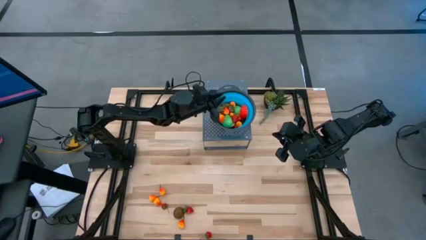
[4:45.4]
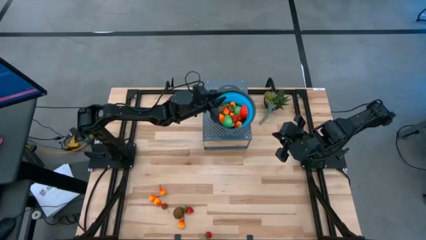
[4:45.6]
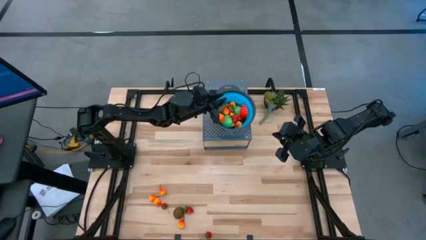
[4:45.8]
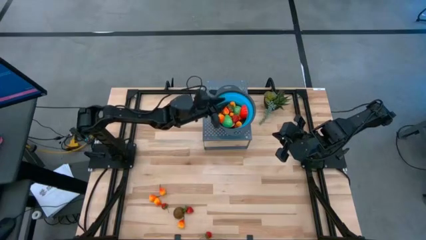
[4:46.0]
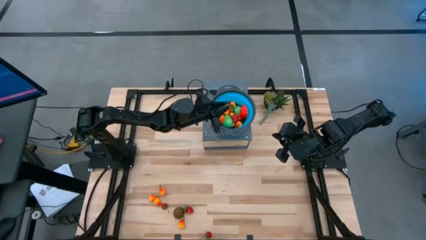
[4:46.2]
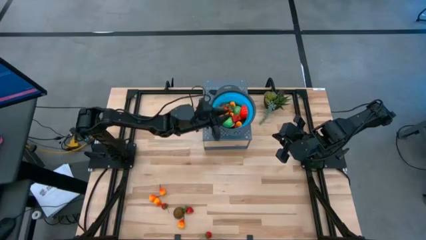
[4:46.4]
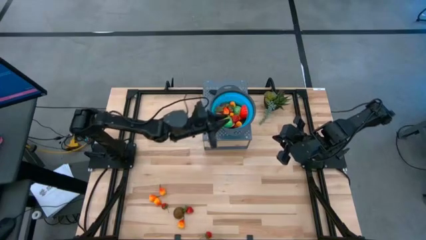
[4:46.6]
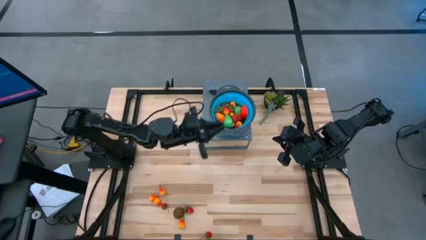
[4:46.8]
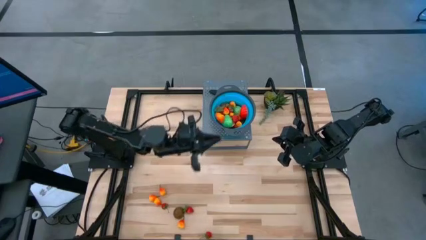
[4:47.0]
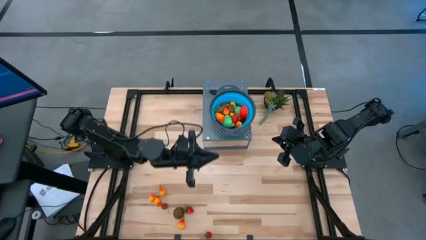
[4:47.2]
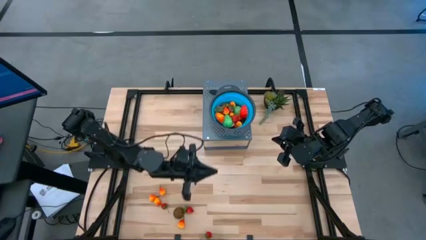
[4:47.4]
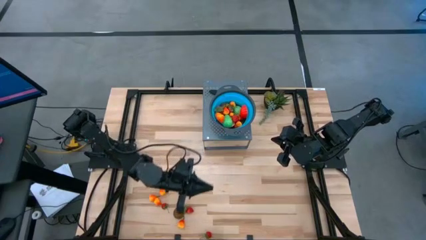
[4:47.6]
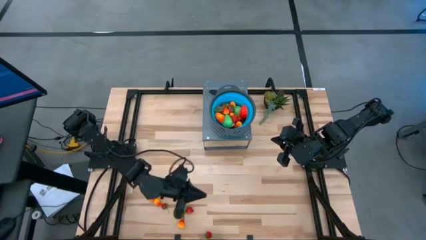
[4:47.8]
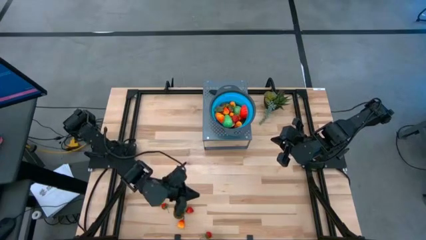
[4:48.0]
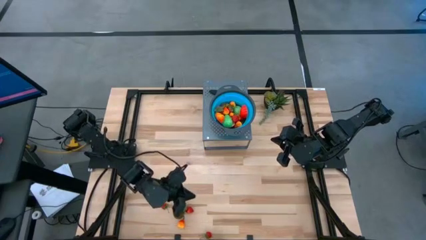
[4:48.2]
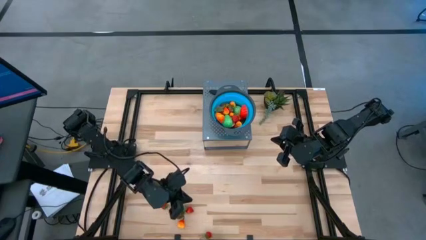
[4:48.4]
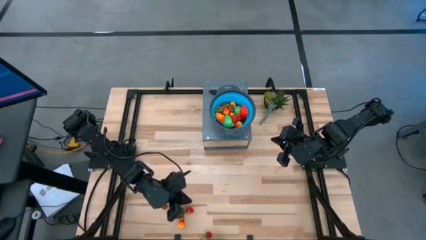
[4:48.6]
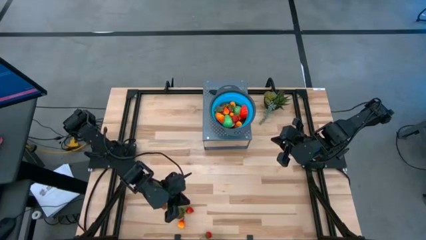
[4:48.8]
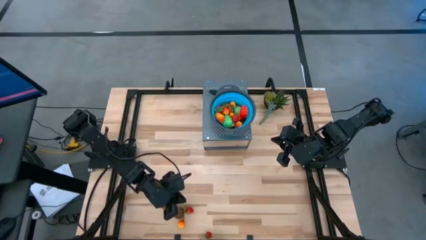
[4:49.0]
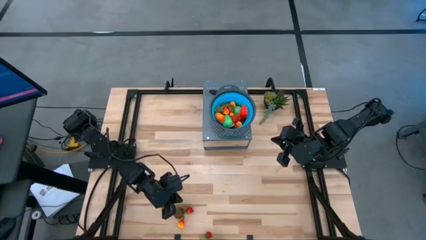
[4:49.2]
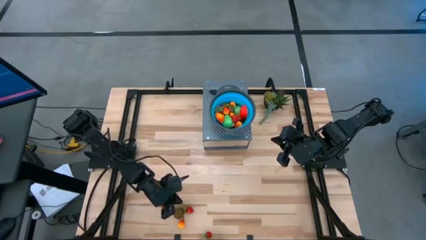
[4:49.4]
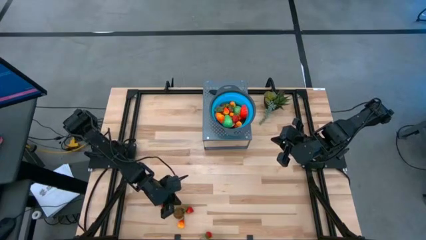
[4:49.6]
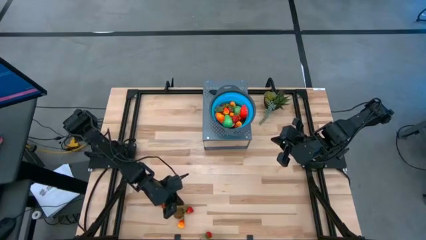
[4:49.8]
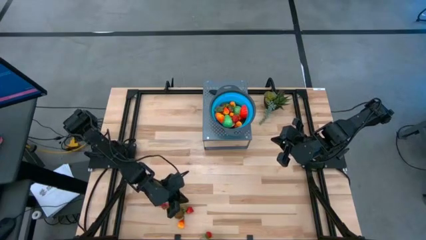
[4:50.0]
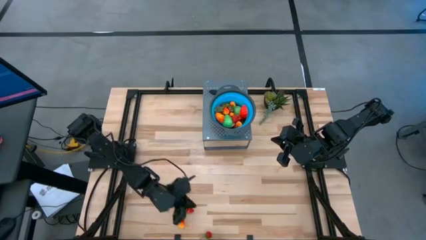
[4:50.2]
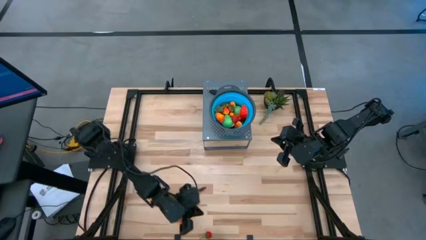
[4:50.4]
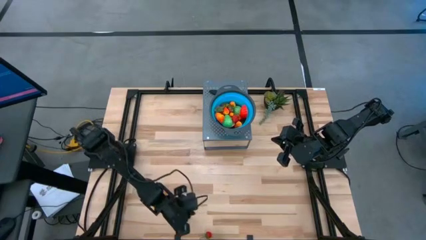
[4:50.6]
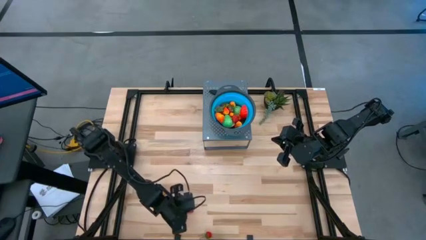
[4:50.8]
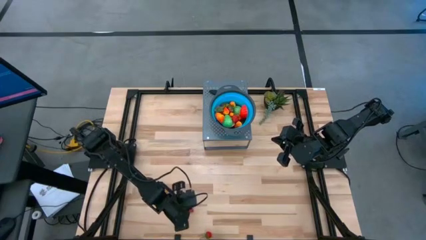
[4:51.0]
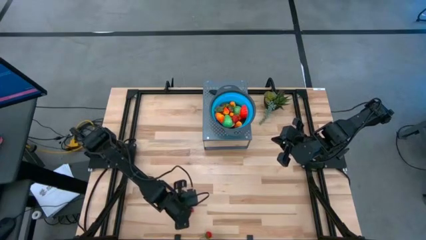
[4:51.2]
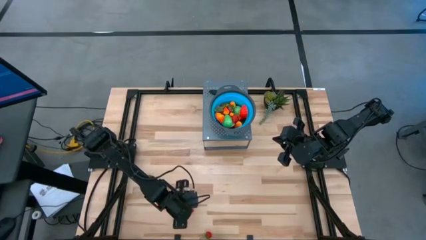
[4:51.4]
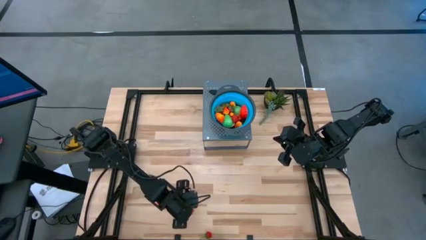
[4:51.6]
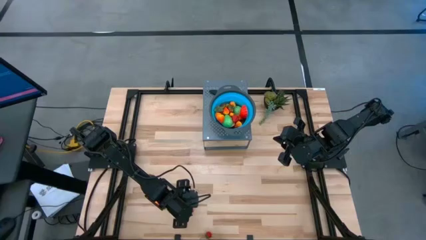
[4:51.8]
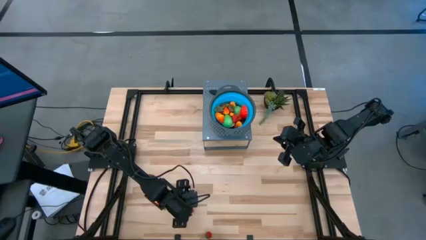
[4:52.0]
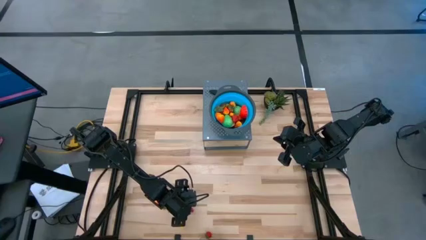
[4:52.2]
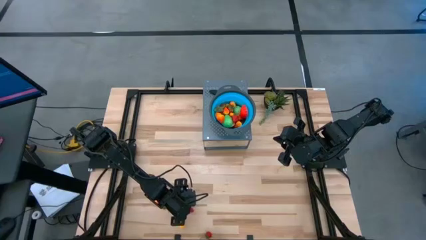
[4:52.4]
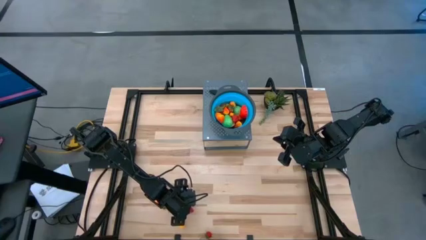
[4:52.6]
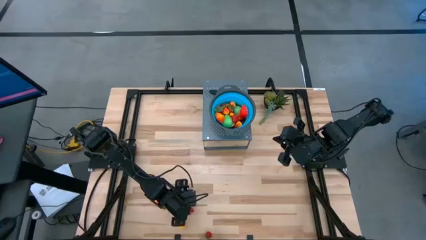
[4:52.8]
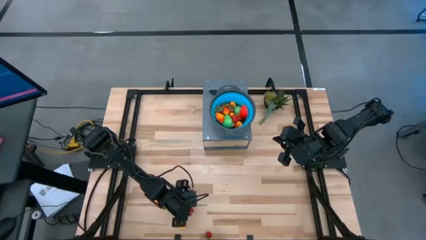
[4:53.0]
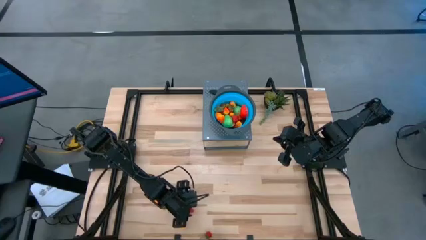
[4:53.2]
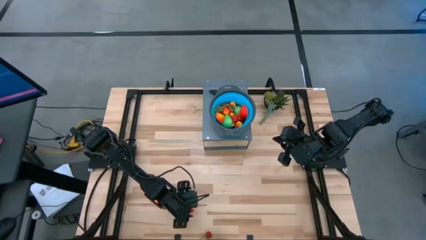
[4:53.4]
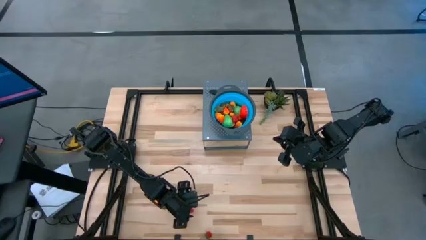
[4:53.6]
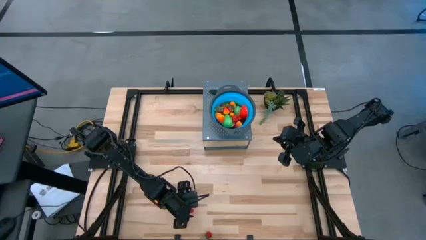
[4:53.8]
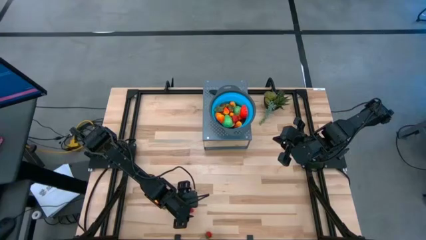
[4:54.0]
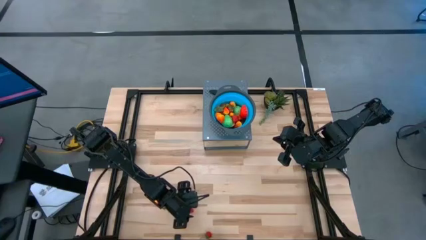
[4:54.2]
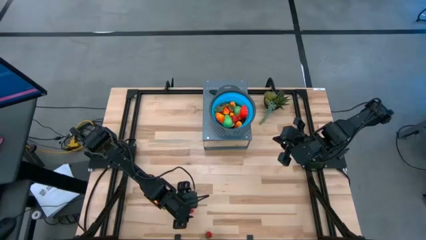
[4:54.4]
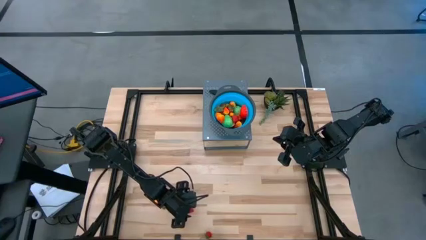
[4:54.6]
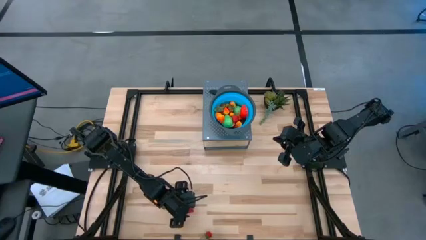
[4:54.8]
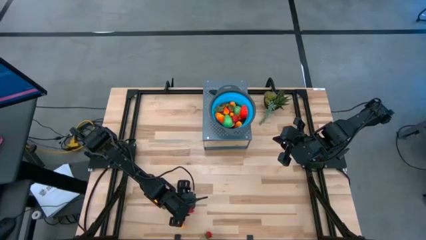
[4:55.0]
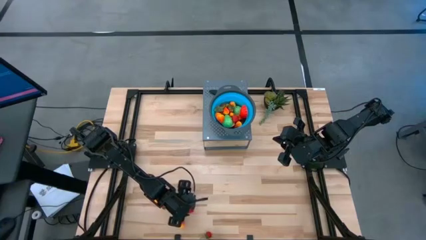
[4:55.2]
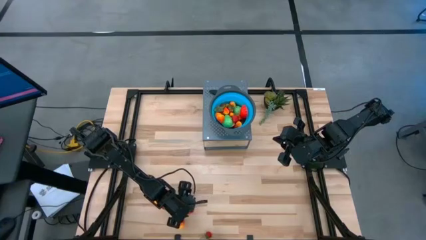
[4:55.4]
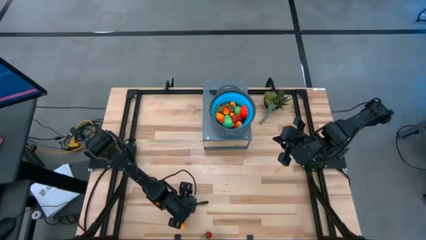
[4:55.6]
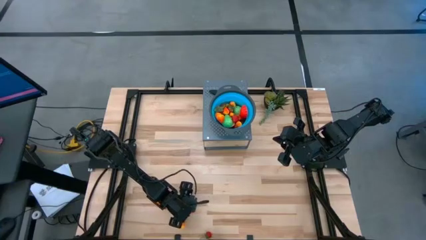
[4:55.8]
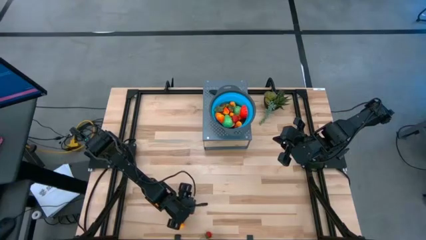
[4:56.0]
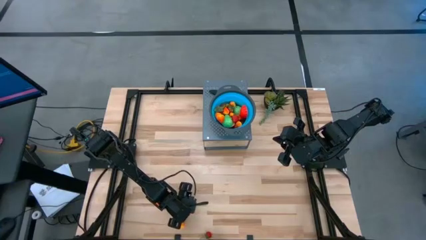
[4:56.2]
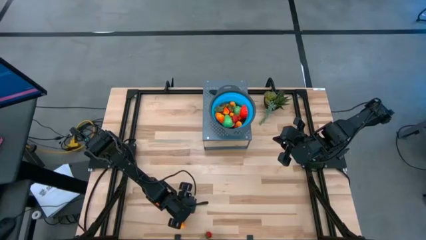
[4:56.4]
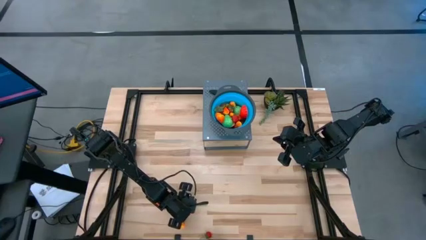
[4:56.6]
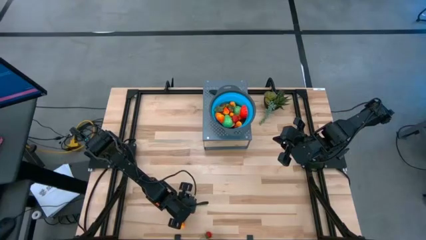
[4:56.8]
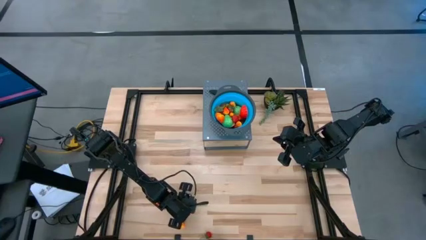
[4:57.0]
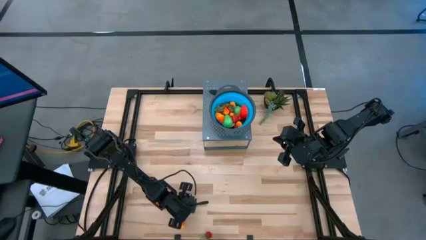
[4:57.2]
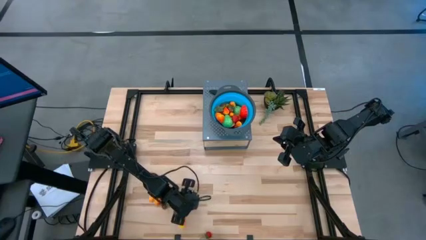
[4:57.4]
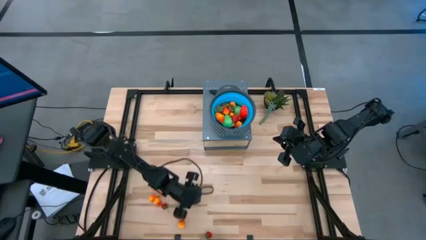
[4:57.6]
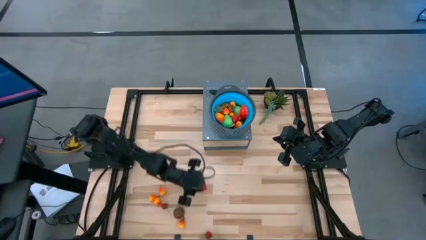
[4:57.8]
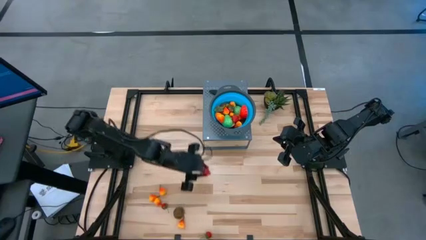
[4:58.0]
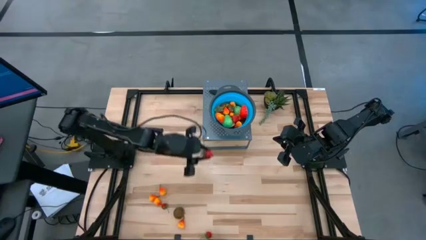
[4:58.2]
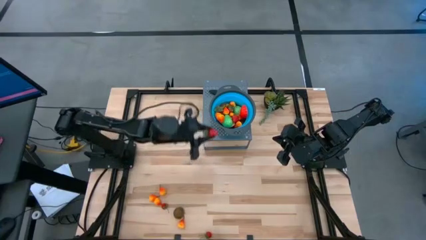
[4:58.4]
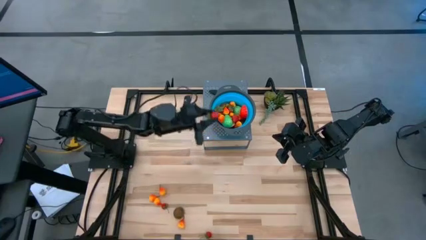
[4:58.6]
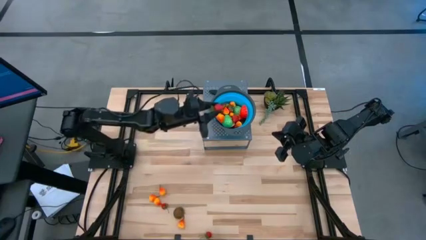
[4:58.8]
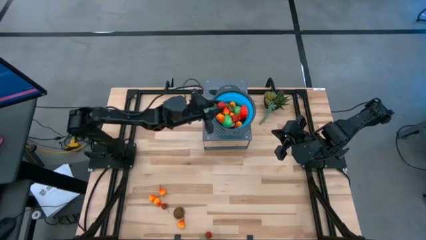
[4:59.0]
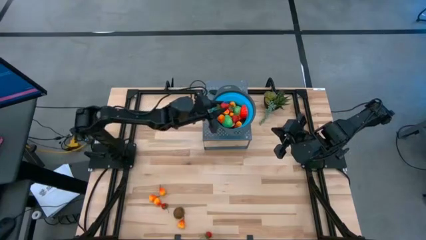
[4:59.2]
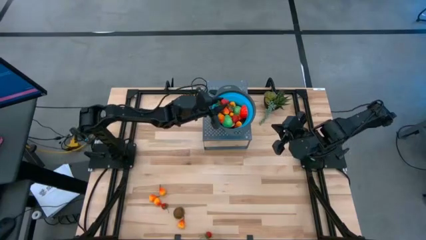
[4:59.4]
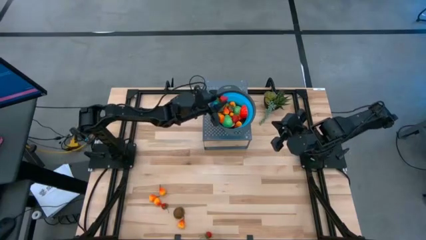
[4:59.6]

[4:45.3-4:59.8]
Task: Pick & Place Fruit
Put the middle strawberry into the strainer bowl
